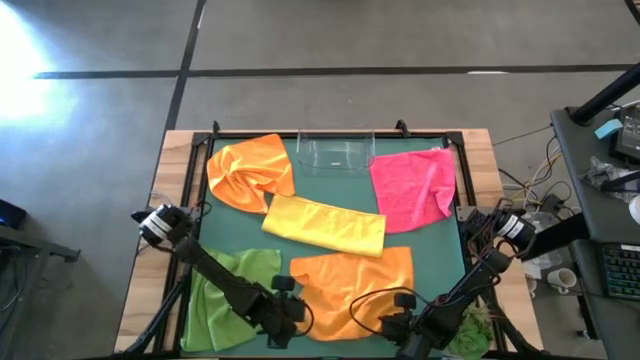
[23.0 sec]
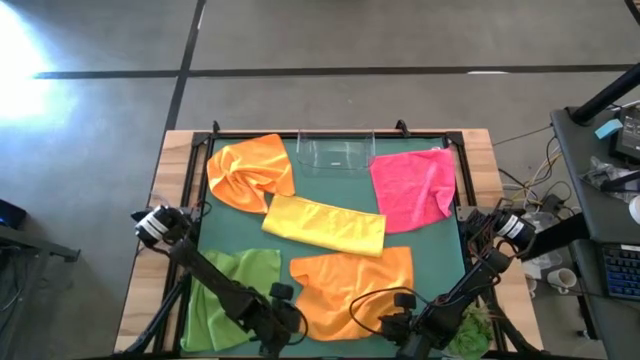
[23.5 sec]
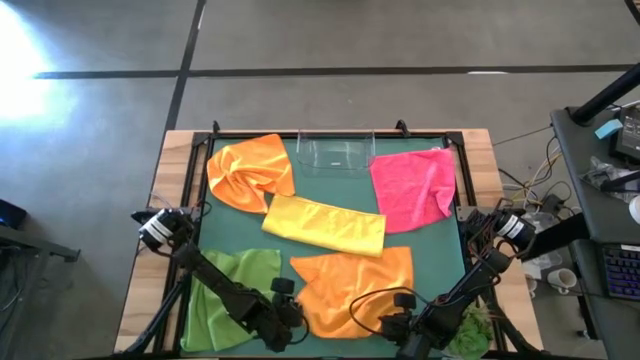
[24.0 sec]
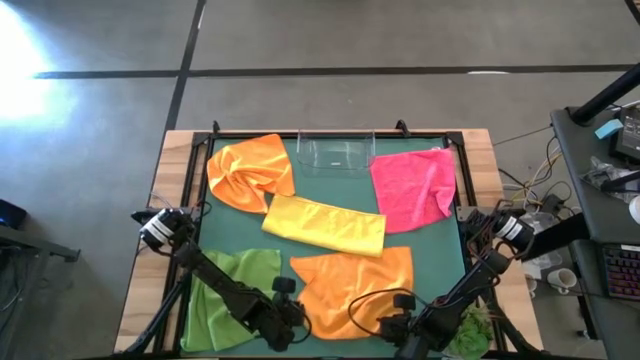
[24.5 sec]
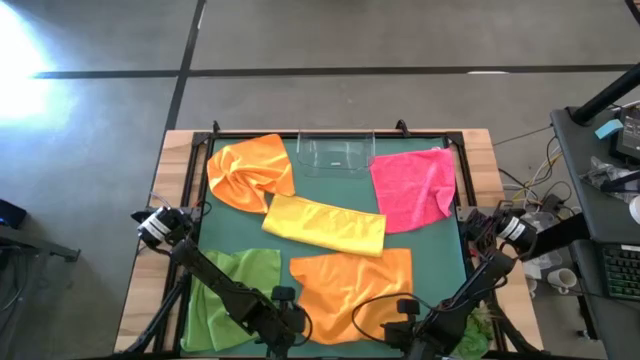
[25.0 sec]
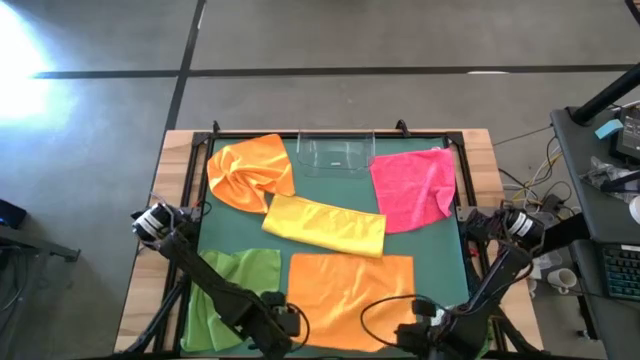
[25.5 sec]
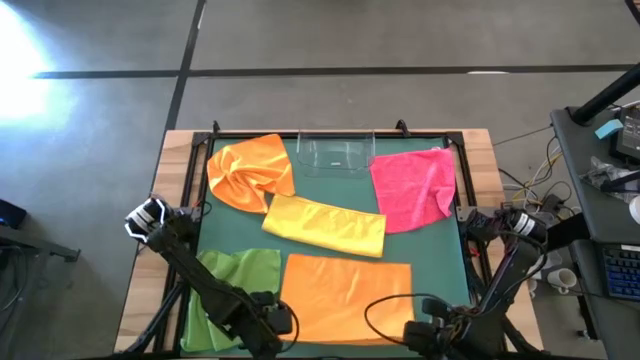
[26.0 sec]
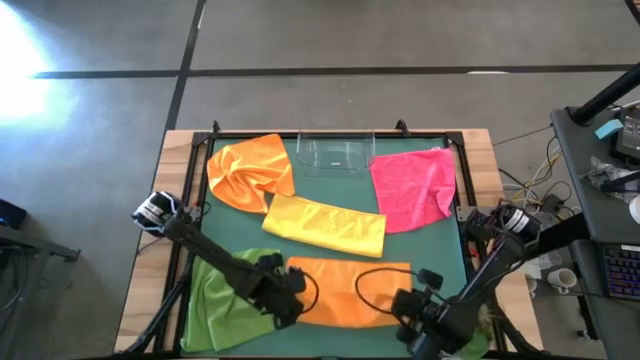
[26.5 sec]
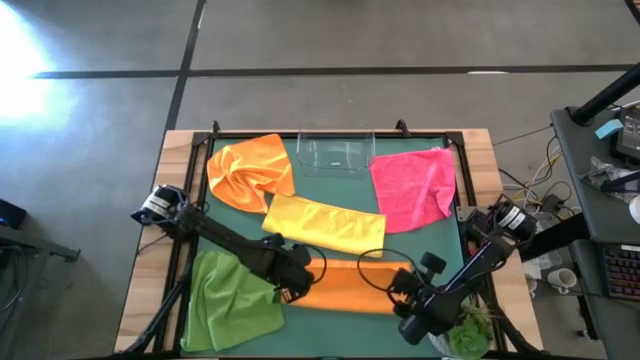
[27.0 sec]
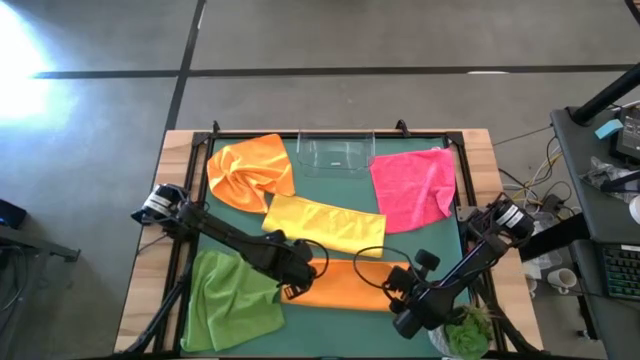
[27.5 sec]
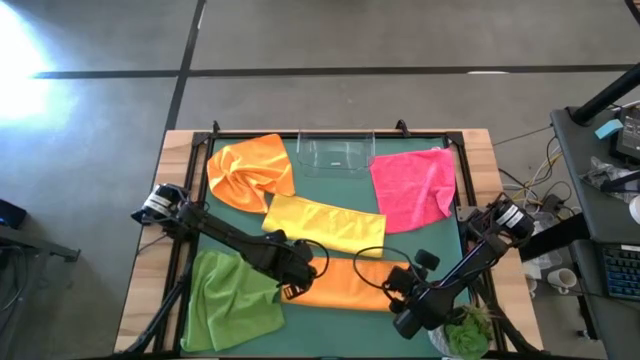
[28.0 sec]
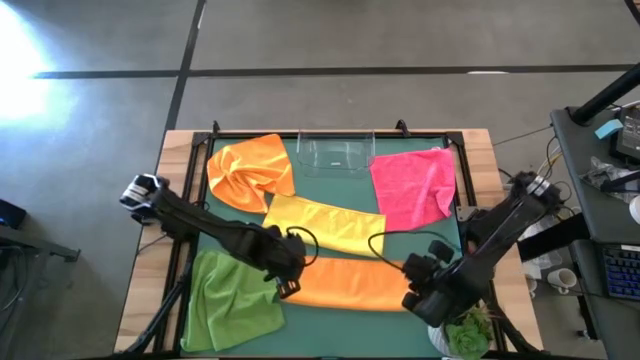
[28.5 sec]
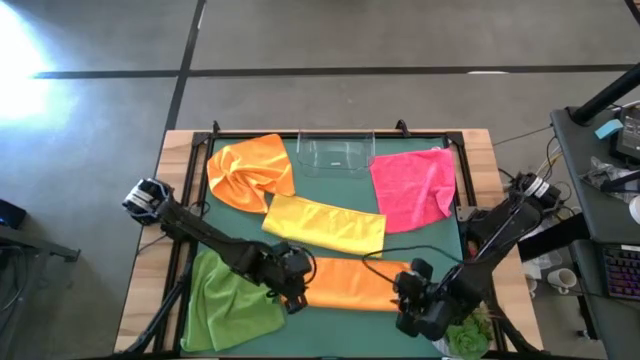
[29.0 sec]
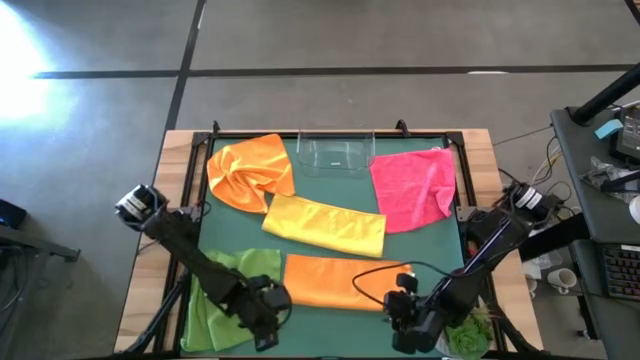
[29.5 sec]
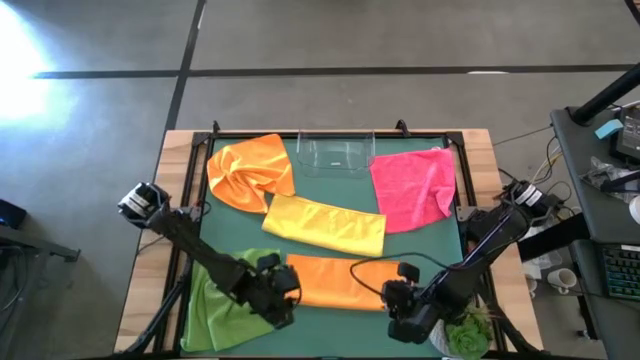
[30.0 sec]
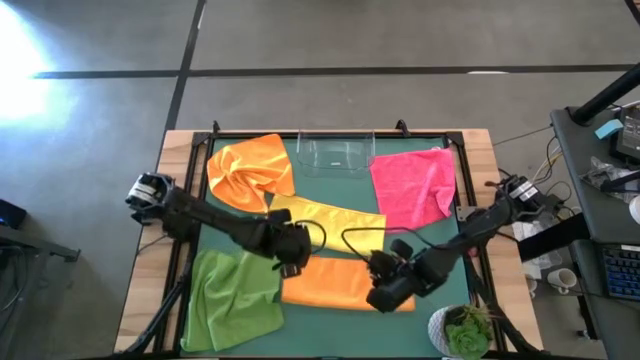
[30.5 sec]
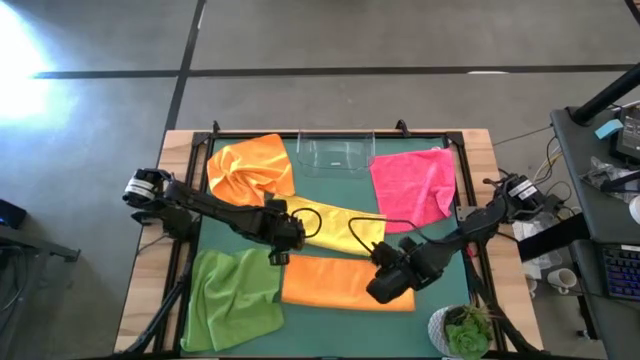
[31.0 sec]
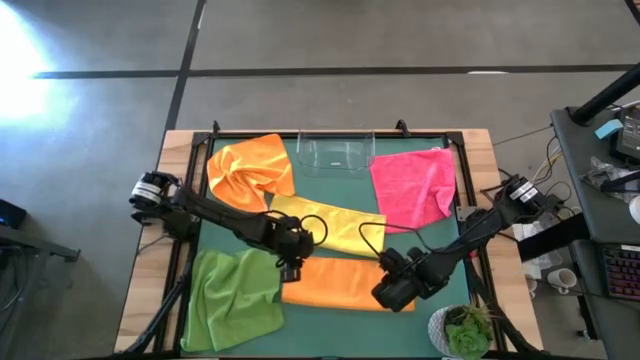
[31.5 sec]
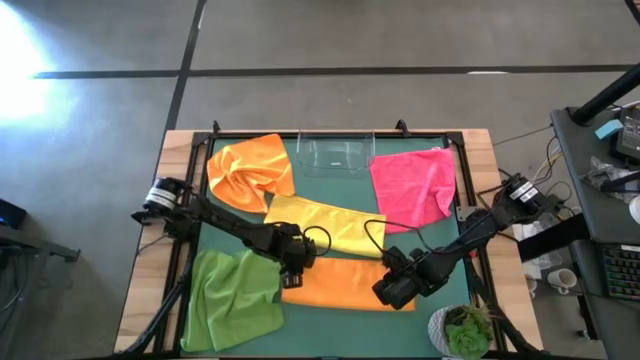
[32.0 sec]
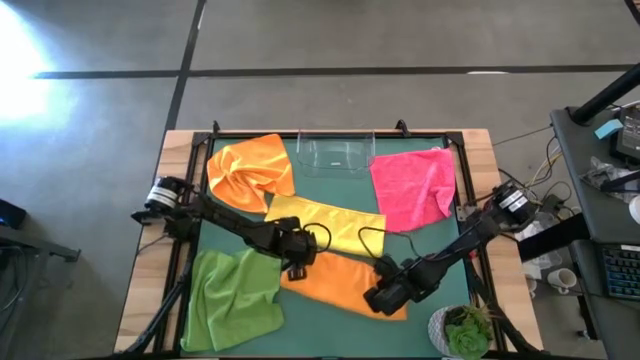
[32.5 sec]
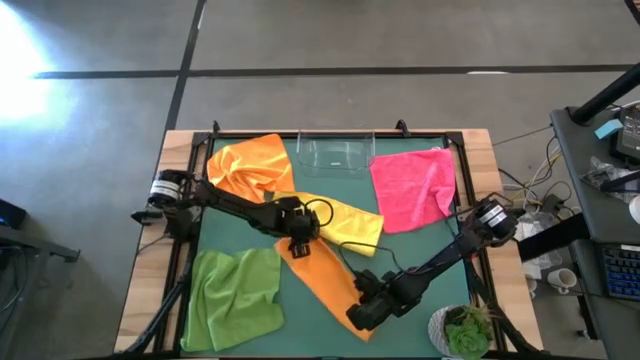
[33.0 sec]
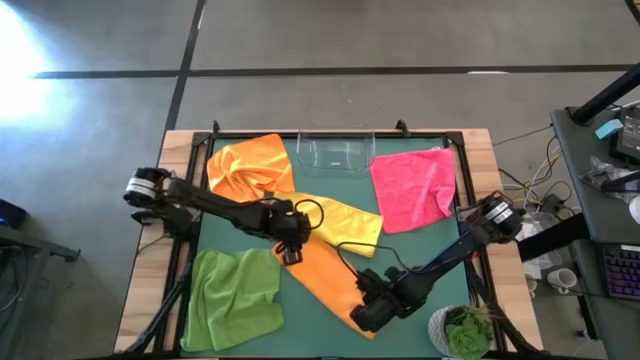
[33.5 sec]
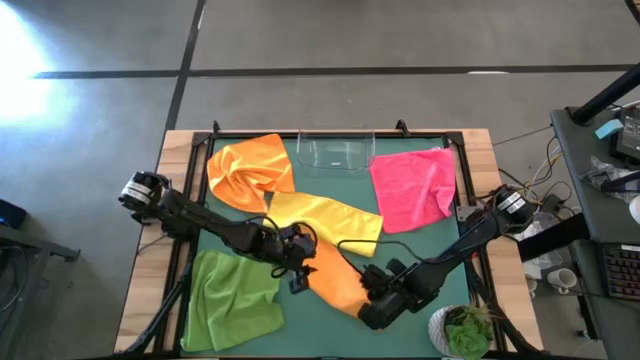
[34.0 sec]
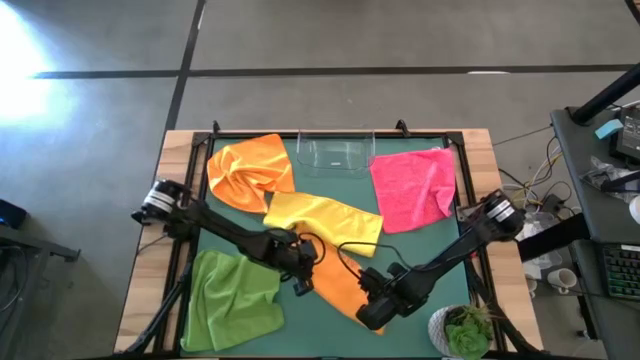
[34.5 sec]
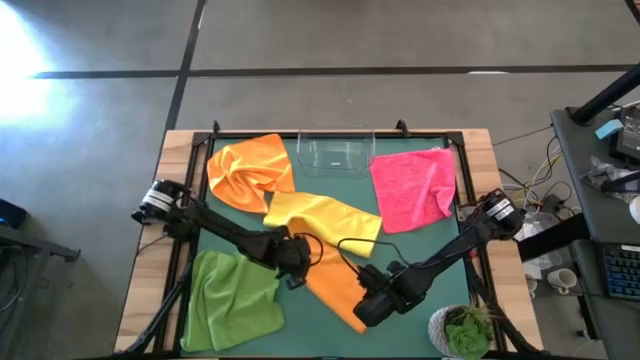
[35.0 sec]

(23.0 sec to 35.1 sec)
Task: Fold microfiber towels
Fold the bottom orange microfiber towel

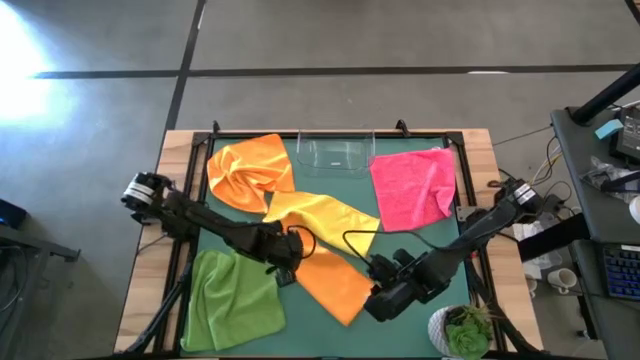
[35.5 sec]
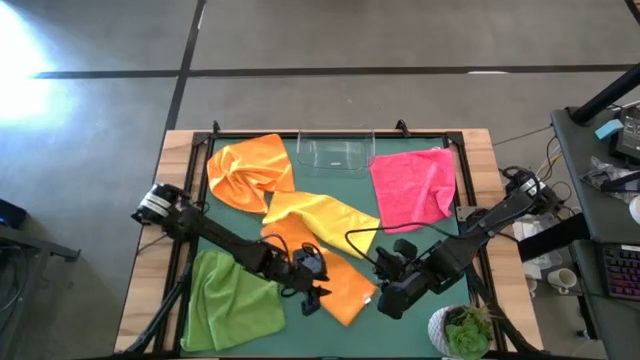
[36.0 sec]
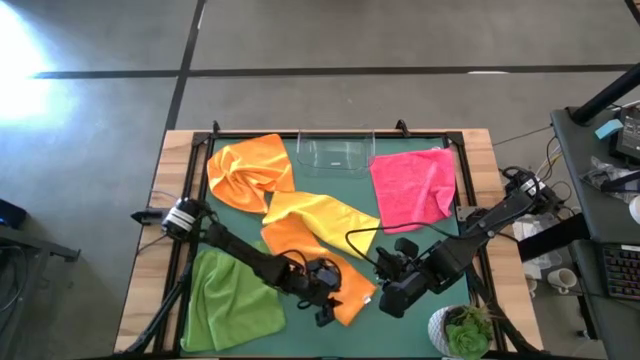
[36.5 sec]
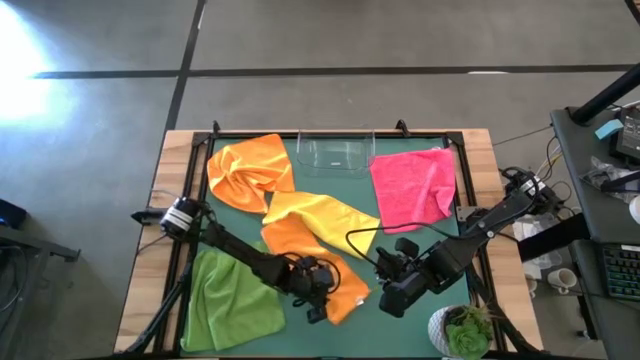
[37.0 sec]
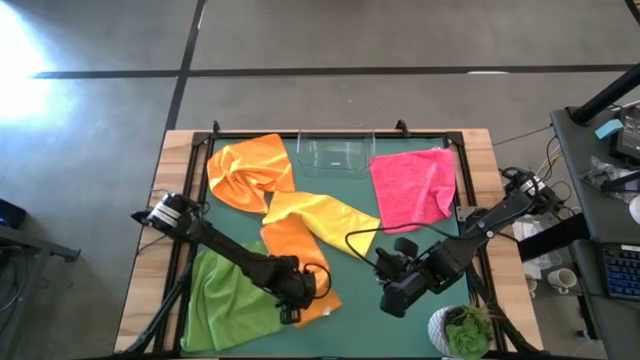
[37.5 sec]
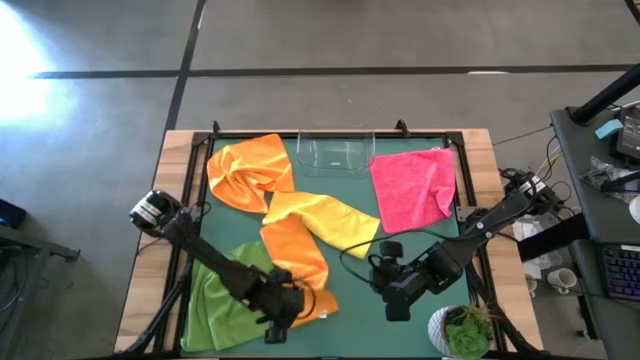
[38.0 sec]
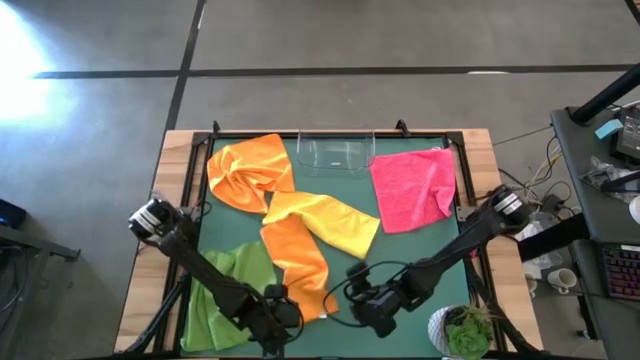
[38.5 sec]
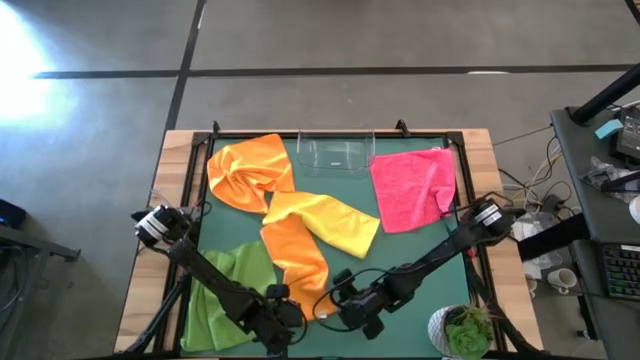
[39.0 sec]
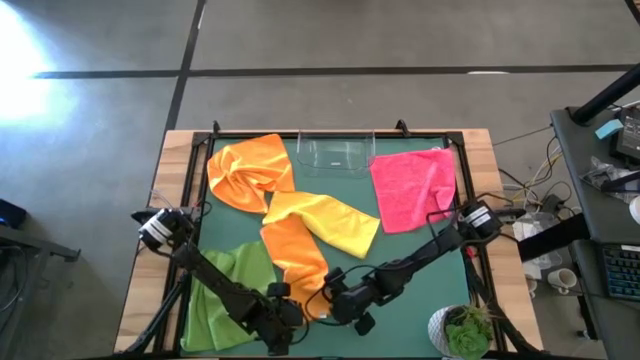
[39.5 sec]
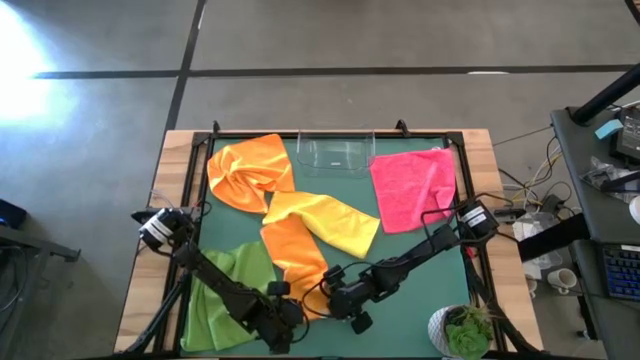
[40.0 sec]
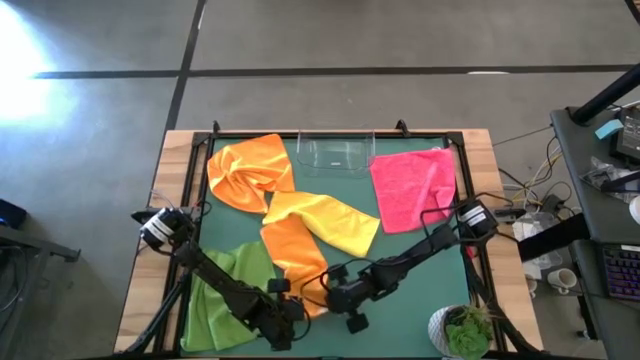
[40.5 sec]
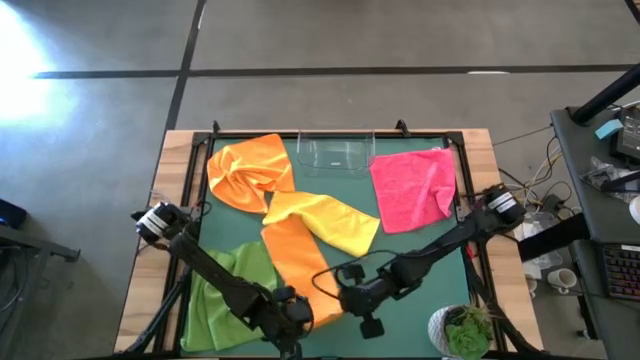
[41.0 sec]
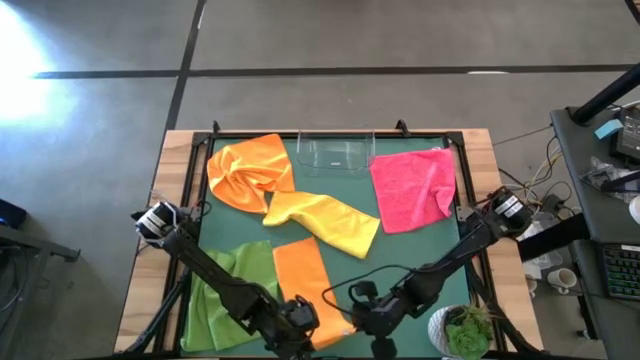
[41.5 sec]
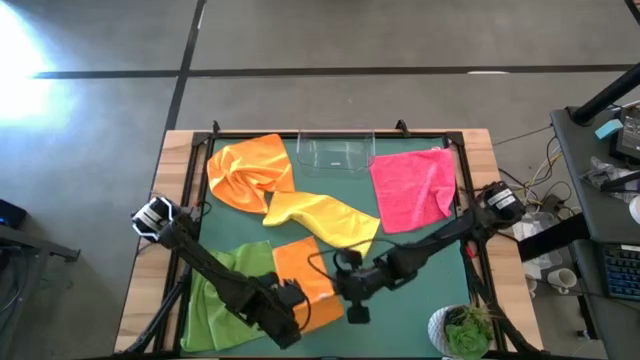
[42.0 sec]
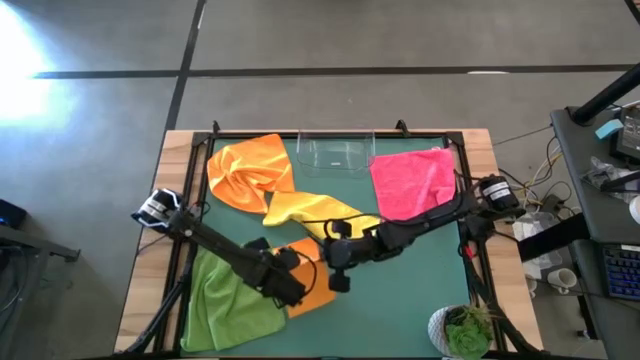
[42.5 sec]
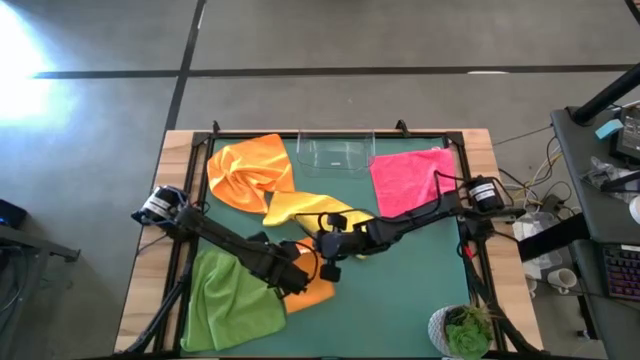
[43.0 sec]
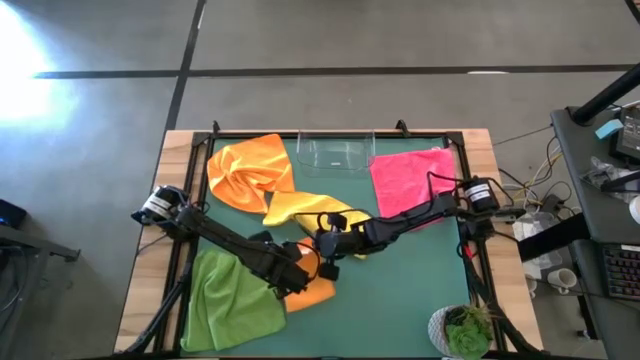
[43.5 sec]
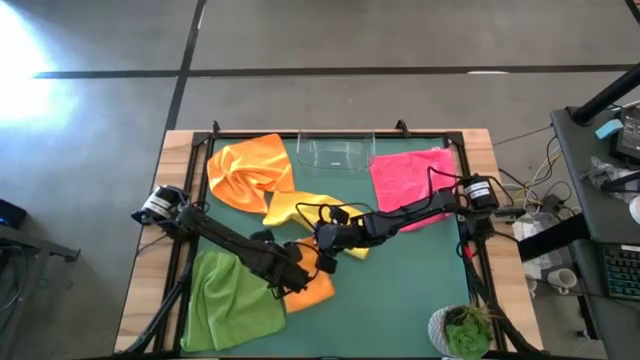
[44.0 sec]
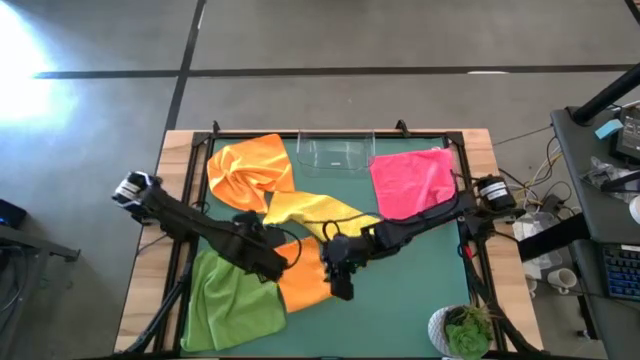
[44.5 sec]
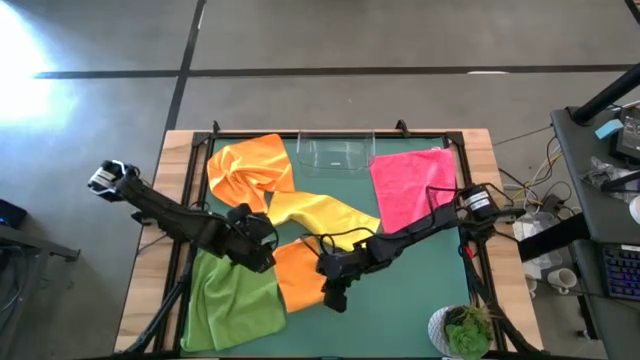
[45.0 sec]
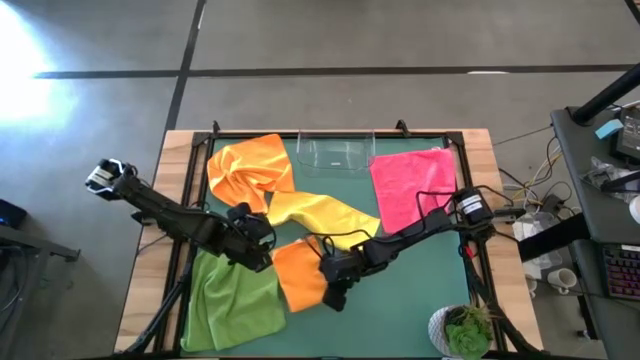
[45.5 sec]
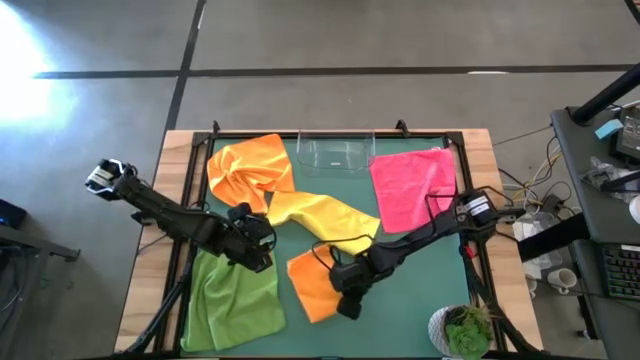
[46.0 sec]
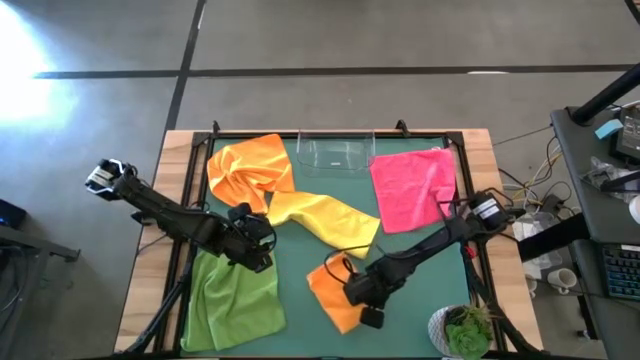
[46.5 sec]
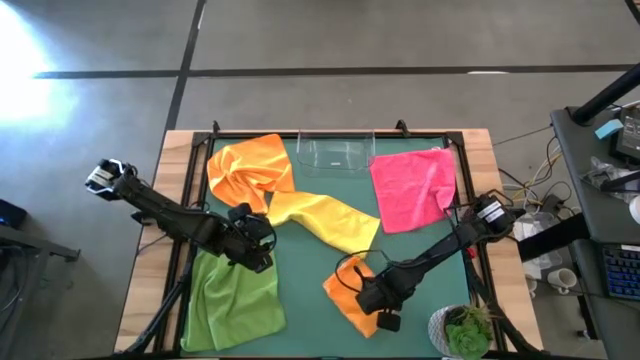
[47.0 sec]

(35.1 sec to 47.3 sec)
Fold the bottom orange microfiber towel
